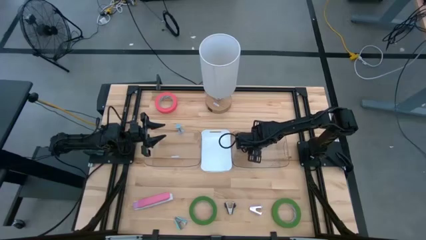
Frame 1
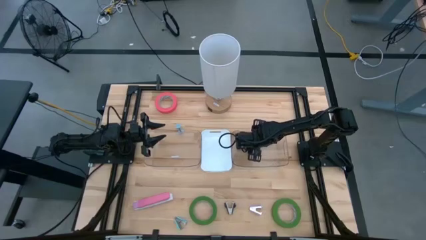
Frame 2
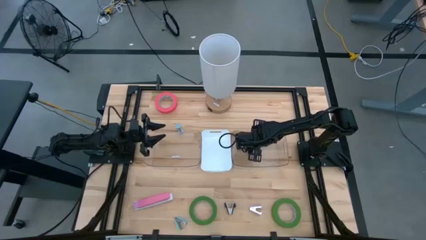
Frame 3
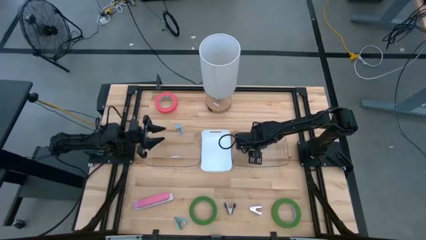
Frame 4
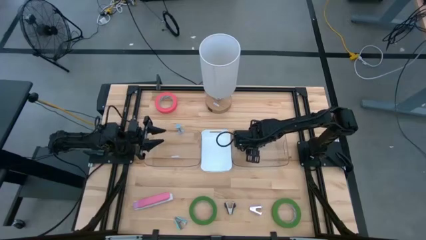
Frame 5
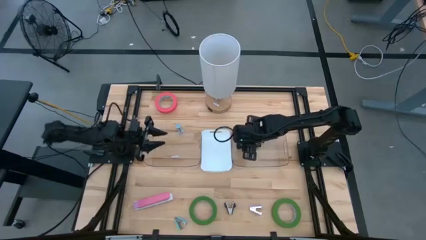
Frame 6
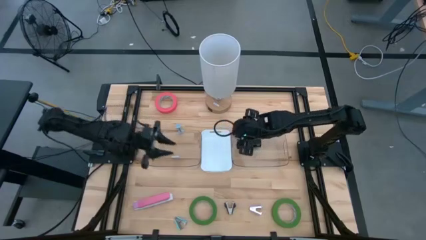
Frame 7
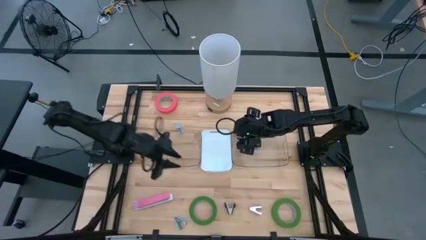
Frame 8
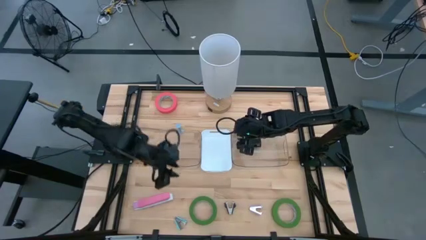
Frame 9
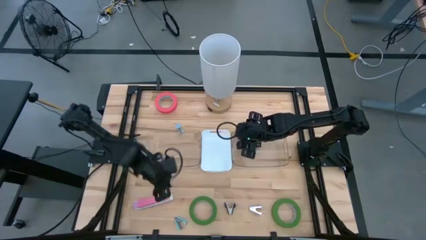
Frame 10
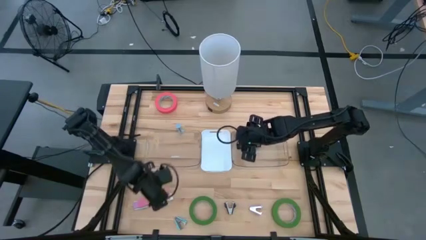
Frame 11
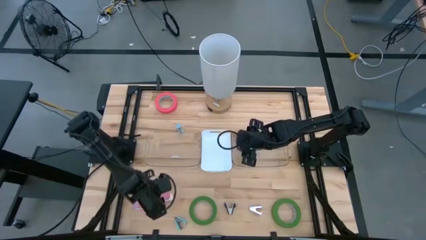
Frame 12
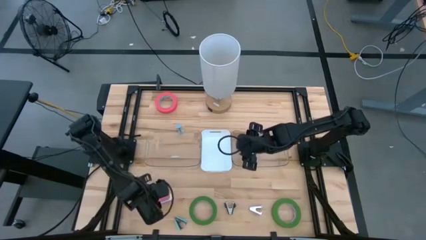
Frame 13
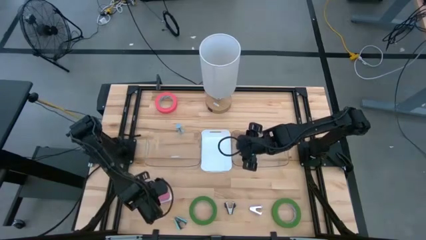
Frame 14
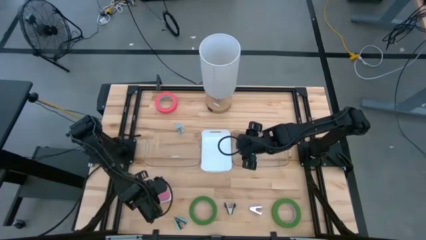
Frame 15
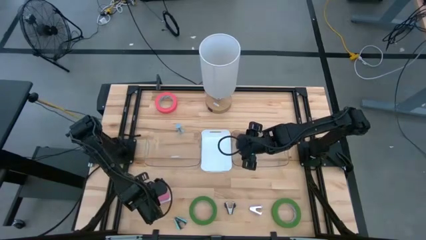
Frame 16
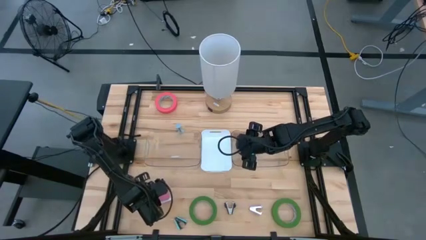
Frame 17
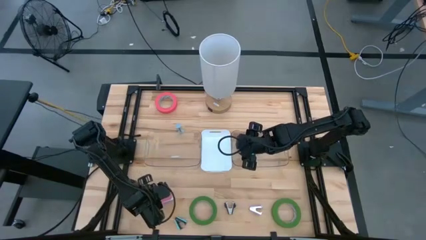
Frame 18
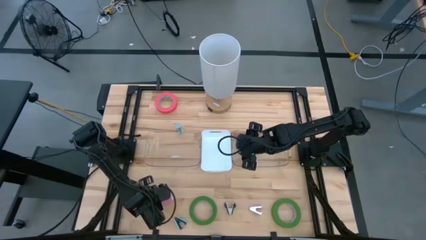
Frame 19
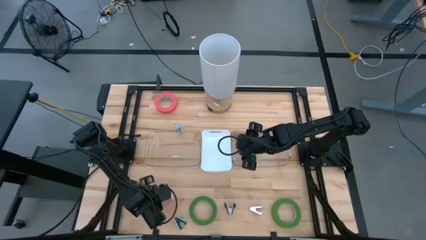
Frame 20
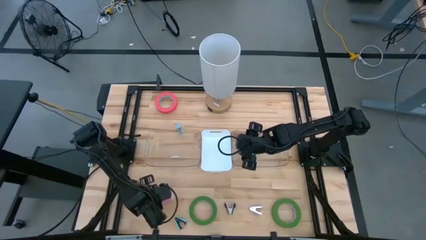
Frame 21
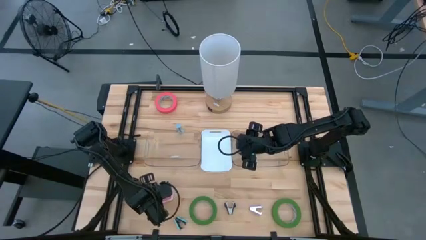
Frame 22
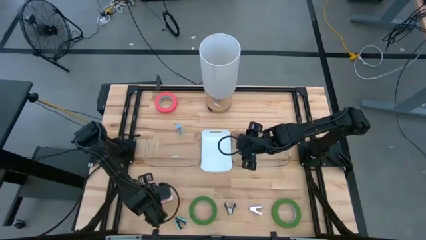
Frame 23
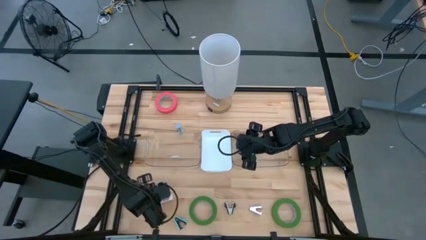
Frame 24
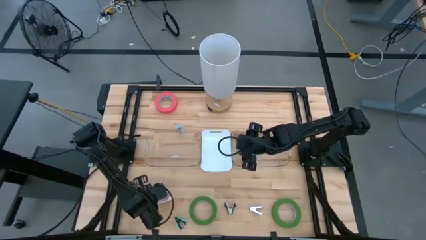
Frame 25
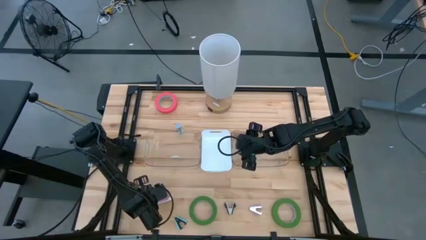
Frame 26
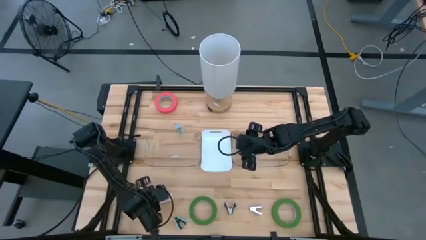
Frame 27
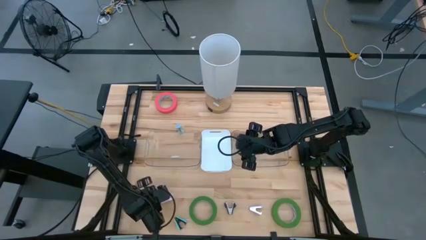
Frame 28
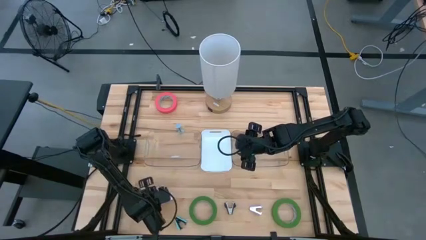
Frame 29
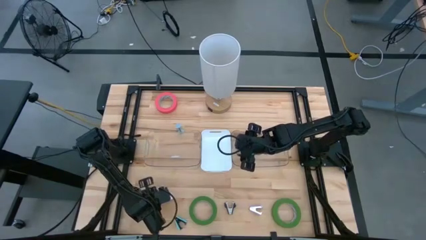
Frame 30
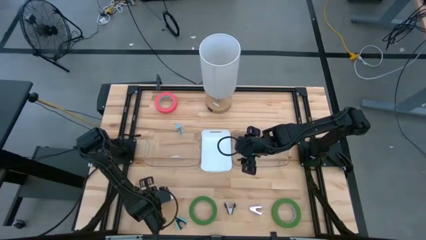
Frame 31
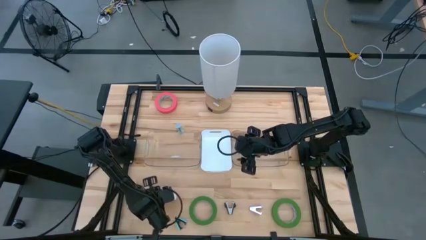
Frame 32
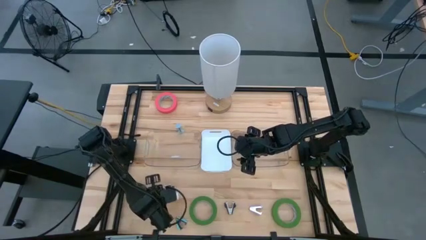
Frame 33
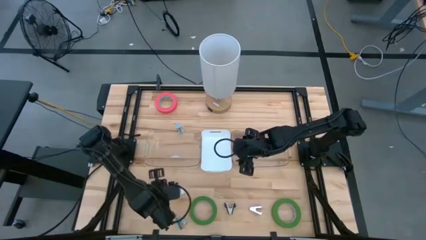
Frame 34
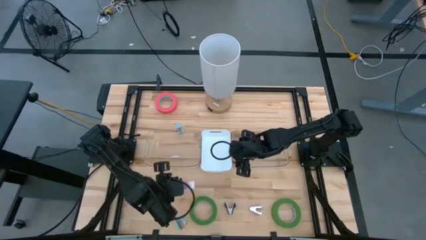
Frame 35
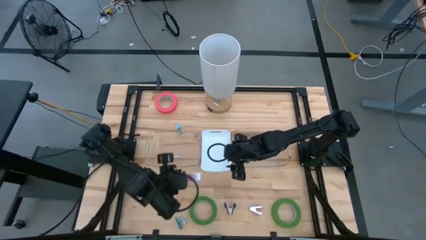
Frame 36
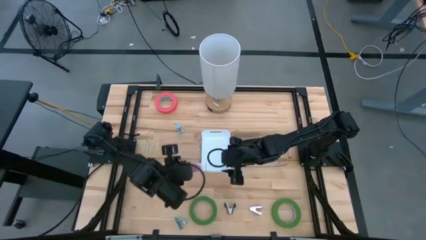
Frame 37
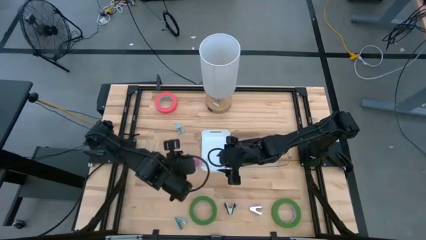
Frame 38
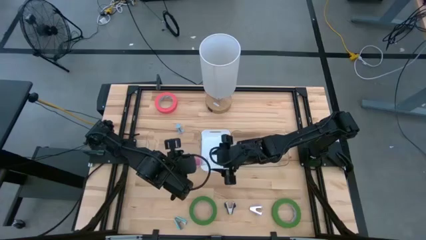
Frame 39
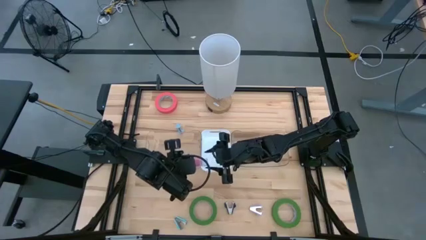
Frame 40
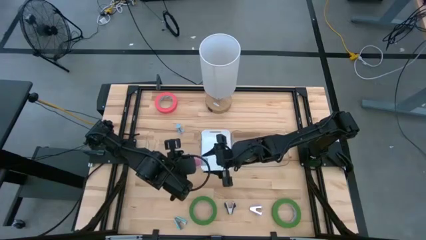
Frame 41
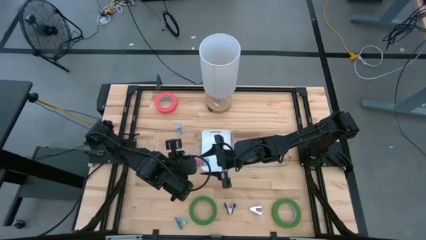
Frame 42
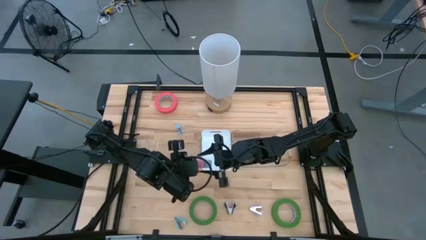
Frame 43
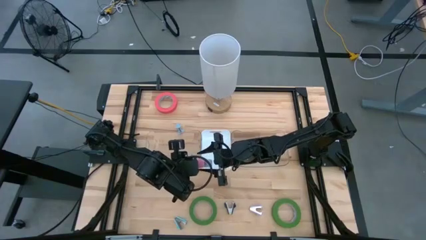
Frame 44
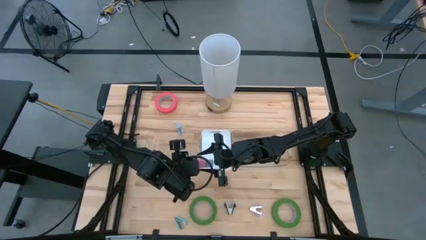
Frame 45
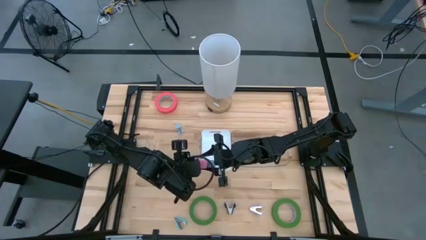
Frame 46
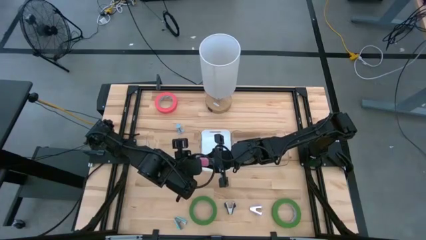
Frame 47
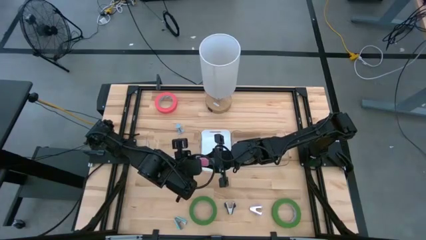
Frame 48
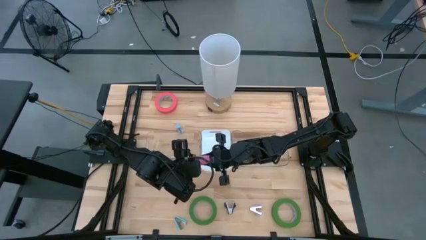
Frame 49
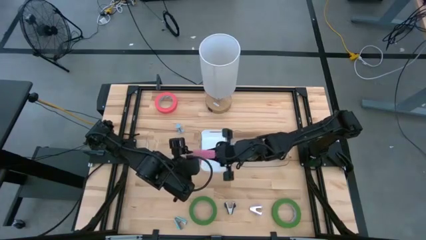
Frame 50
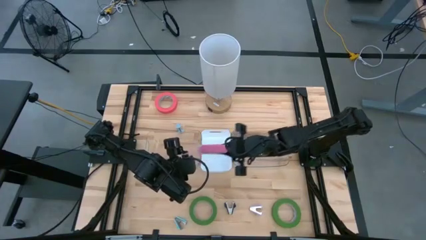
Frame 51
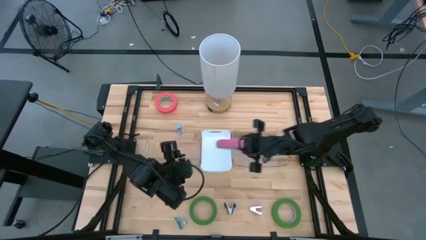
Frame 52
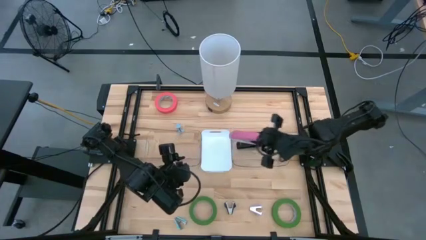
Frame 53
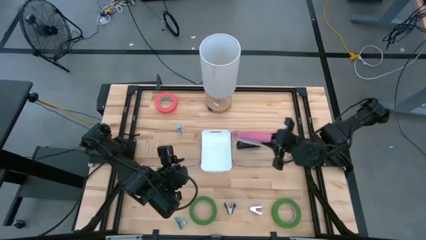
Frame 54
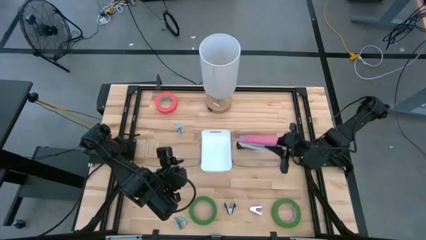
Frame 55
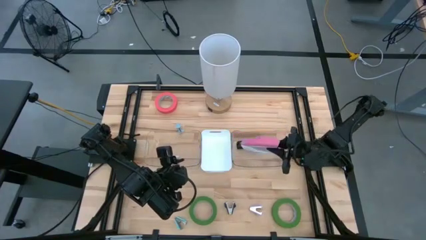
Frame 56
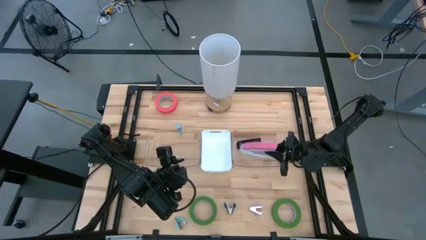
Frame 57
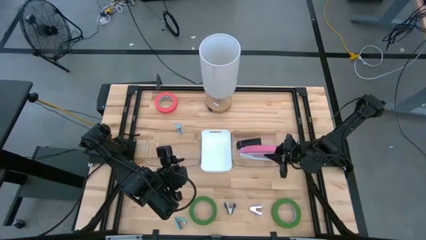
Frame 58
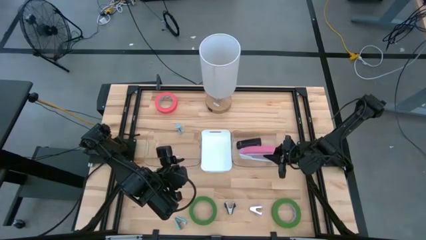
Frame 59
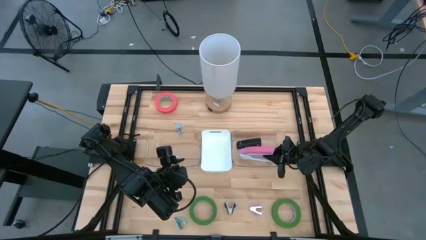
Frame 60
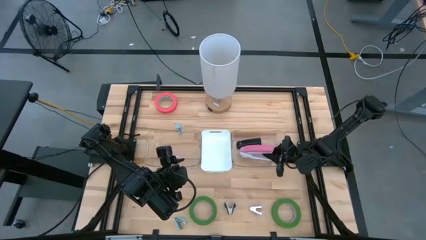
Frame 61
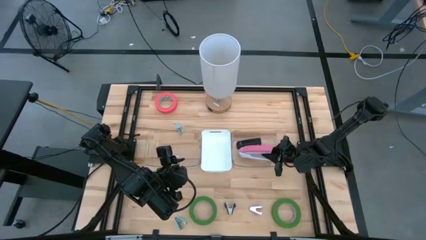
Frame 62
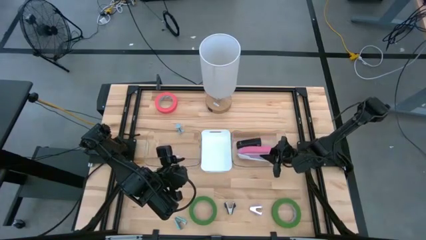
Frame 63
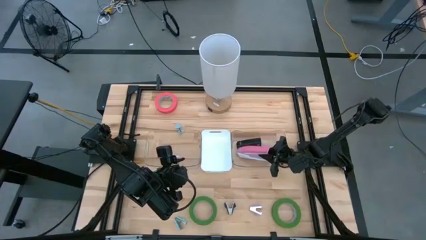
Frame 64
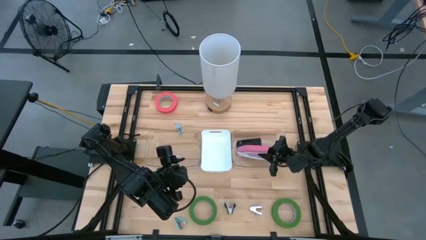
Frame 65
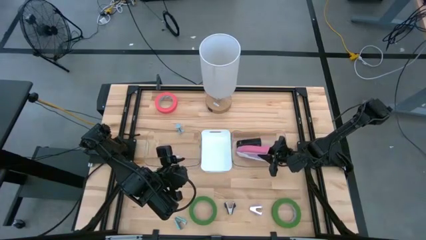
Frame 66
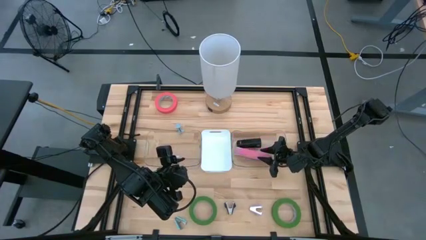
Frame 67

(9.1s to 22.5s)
Task: Pick and place Stapler, Stapler remover, tape
Put the pink stapler into the right transparent bin
